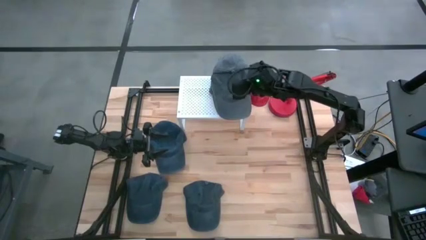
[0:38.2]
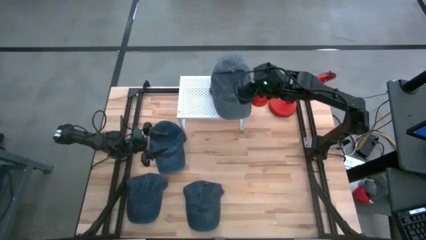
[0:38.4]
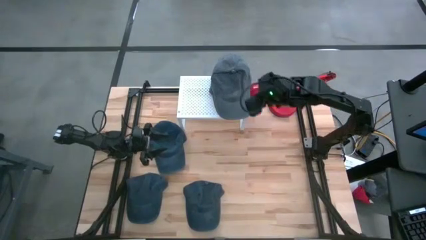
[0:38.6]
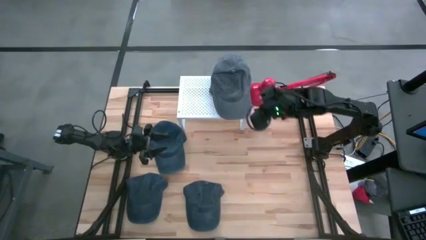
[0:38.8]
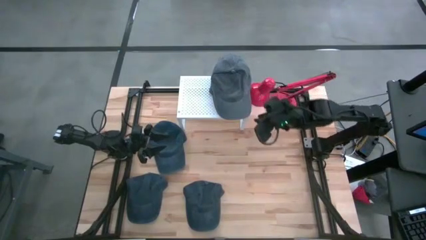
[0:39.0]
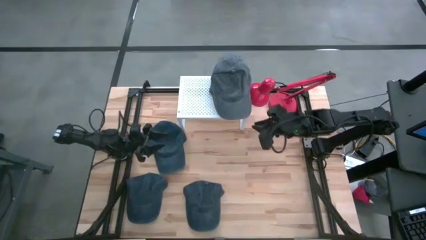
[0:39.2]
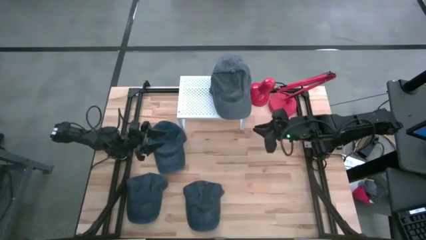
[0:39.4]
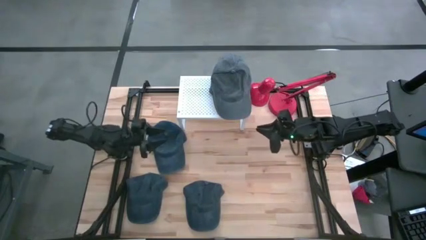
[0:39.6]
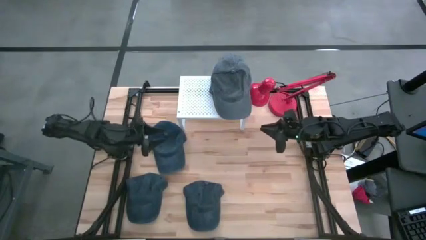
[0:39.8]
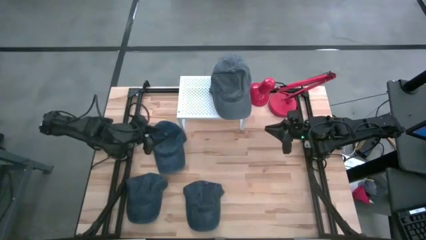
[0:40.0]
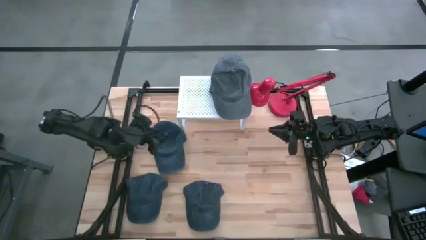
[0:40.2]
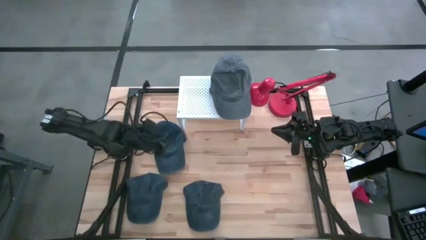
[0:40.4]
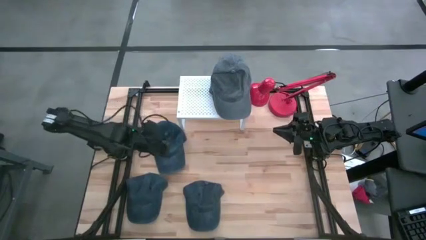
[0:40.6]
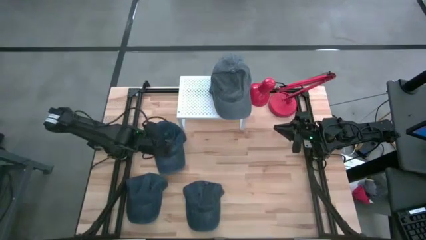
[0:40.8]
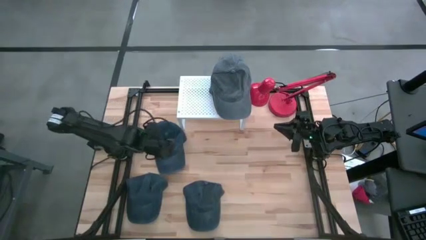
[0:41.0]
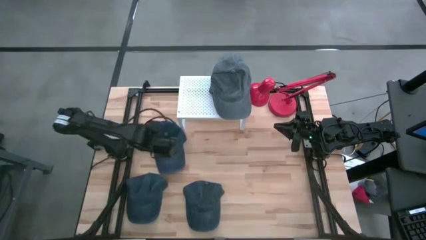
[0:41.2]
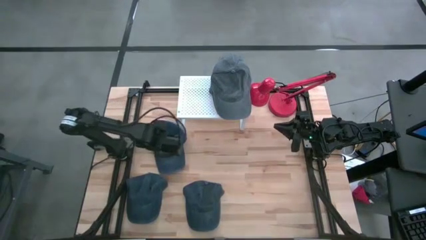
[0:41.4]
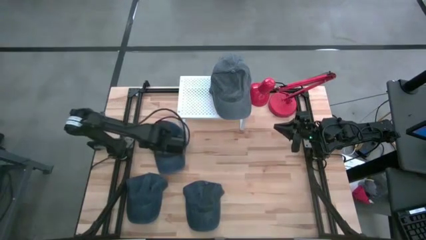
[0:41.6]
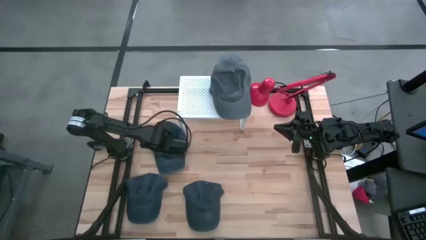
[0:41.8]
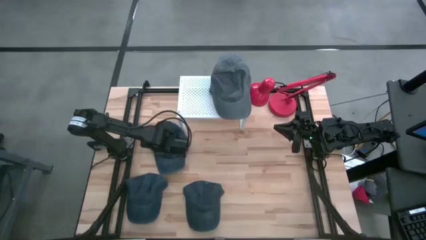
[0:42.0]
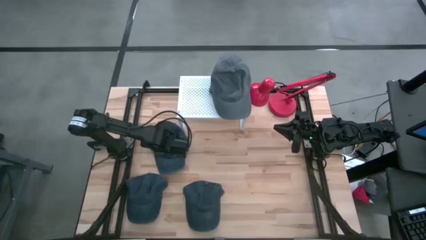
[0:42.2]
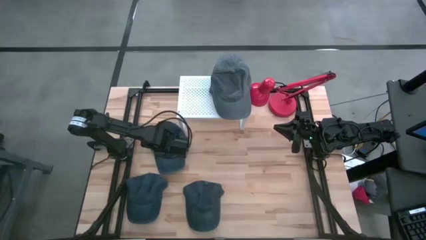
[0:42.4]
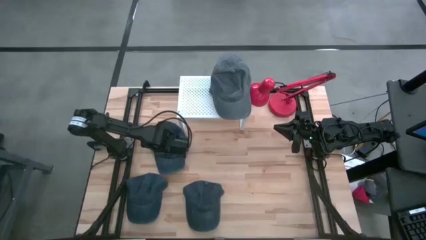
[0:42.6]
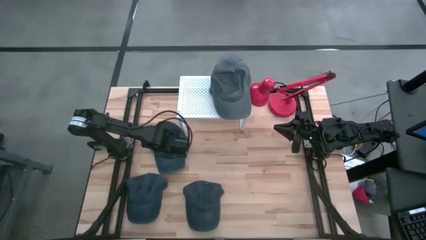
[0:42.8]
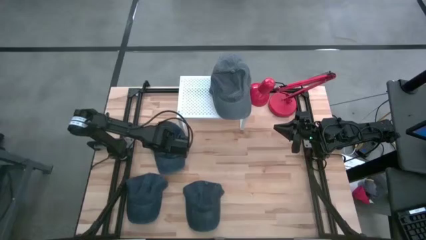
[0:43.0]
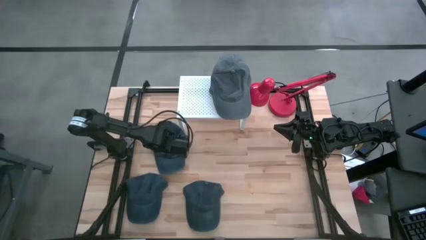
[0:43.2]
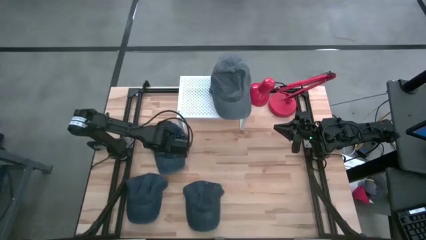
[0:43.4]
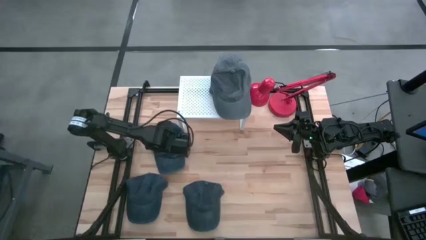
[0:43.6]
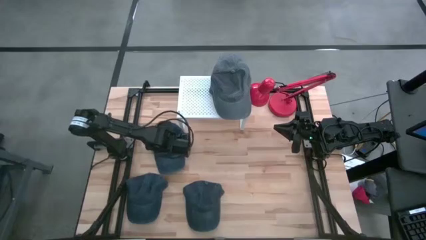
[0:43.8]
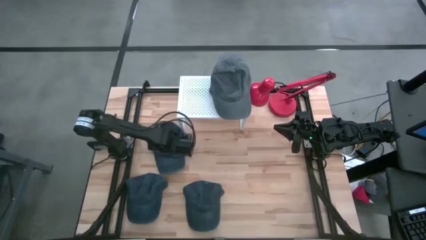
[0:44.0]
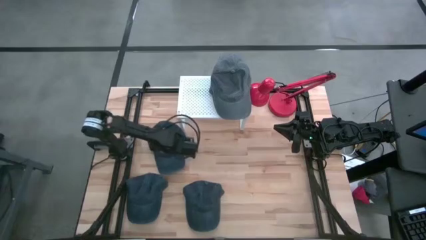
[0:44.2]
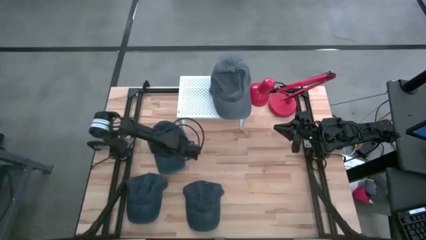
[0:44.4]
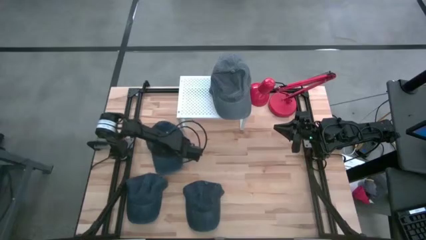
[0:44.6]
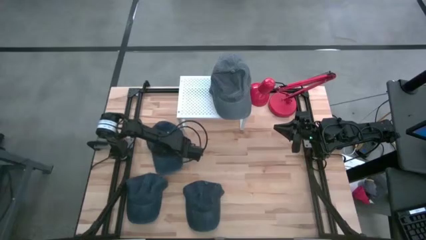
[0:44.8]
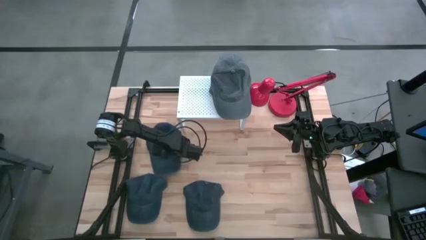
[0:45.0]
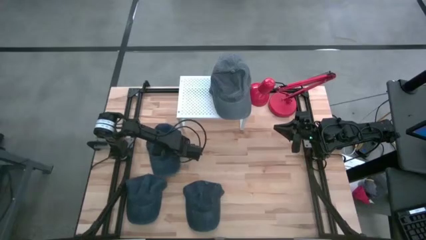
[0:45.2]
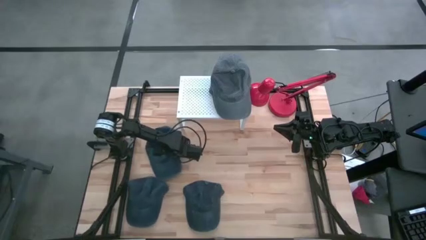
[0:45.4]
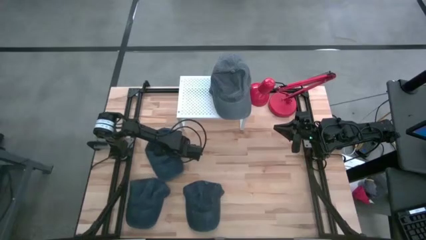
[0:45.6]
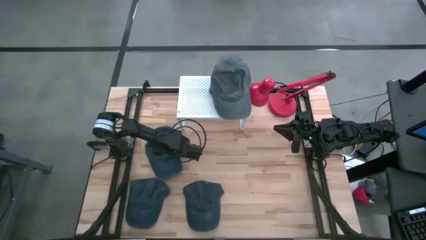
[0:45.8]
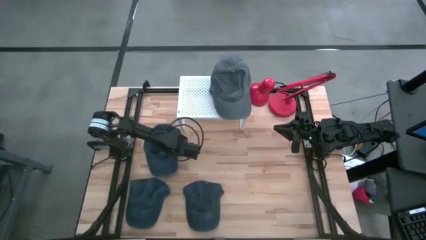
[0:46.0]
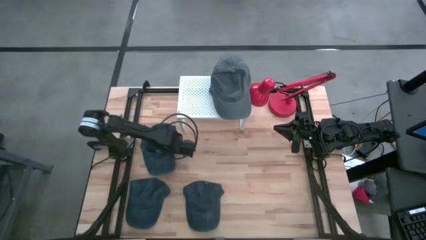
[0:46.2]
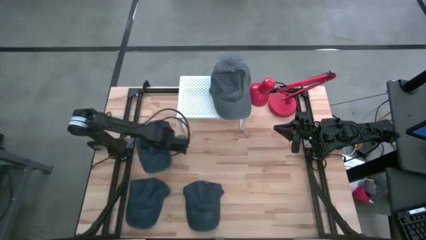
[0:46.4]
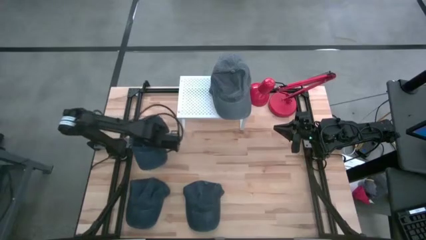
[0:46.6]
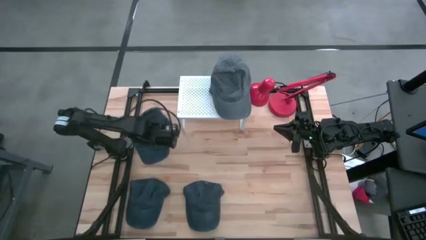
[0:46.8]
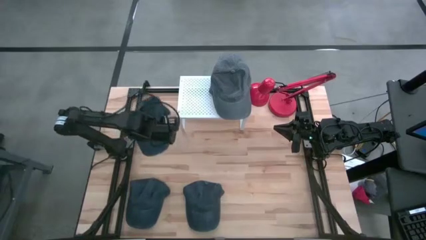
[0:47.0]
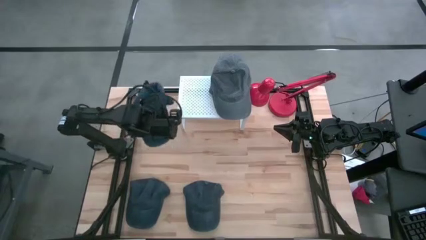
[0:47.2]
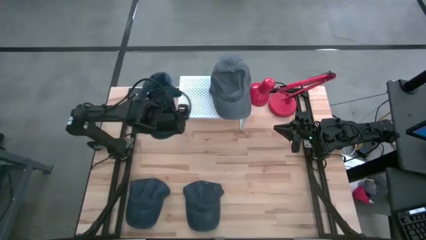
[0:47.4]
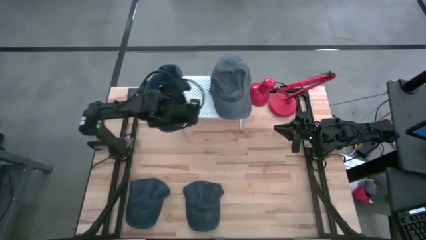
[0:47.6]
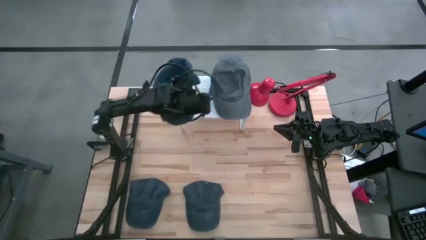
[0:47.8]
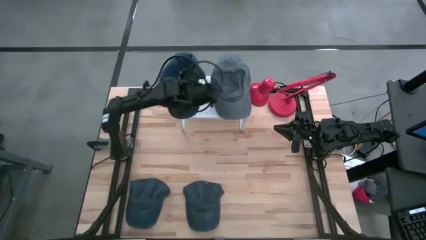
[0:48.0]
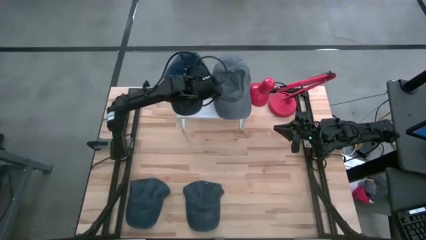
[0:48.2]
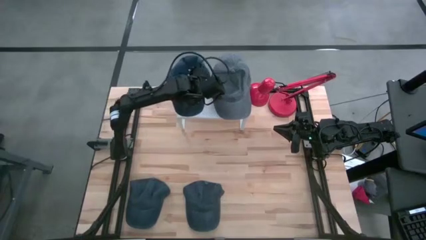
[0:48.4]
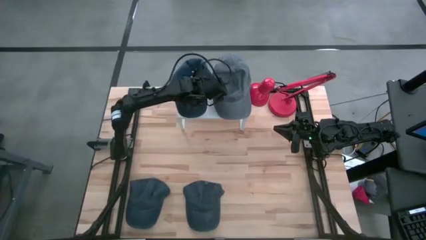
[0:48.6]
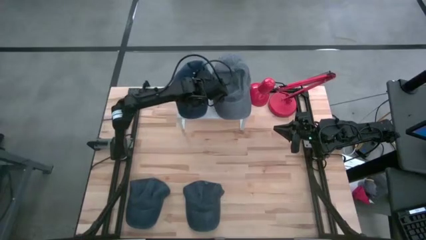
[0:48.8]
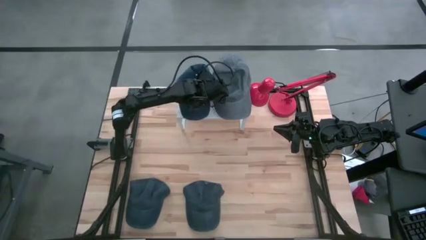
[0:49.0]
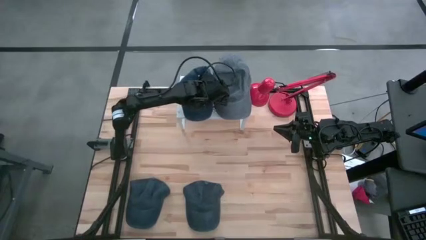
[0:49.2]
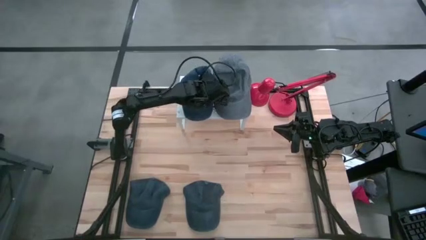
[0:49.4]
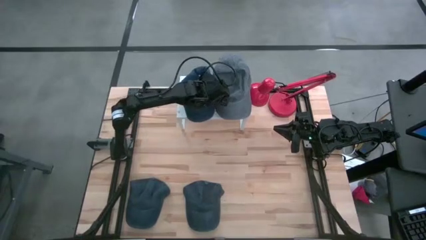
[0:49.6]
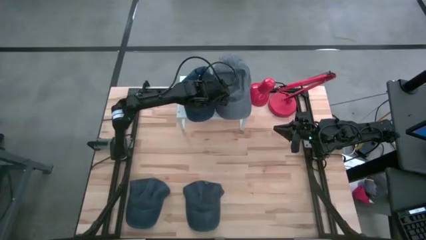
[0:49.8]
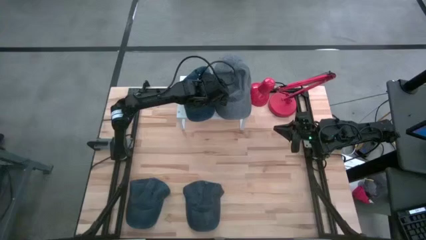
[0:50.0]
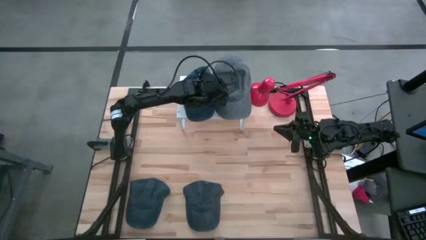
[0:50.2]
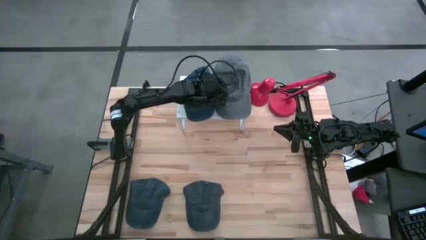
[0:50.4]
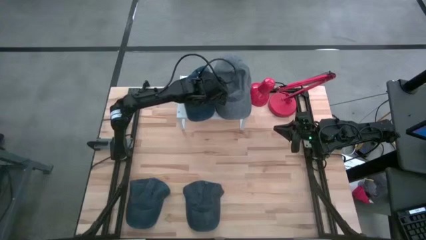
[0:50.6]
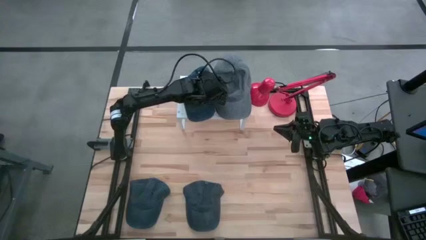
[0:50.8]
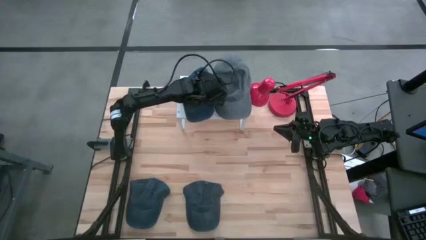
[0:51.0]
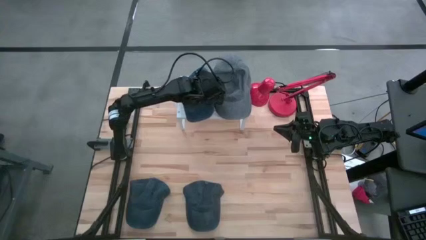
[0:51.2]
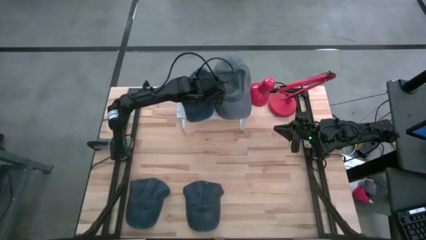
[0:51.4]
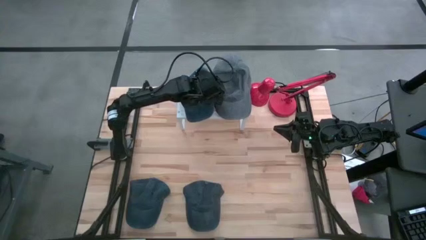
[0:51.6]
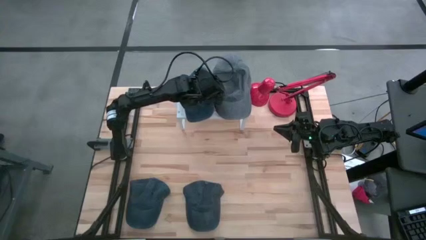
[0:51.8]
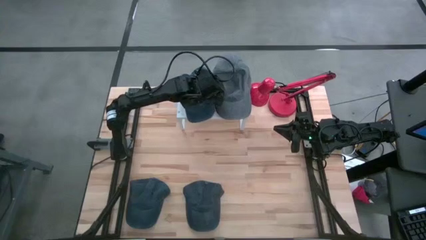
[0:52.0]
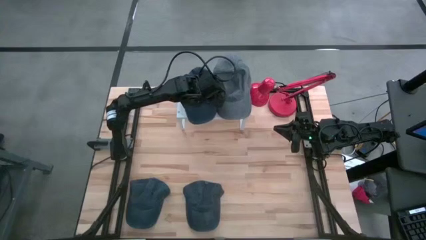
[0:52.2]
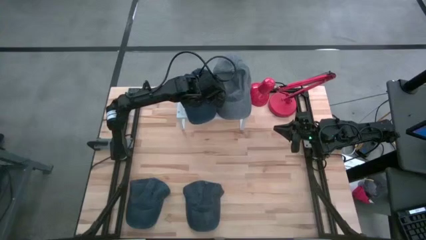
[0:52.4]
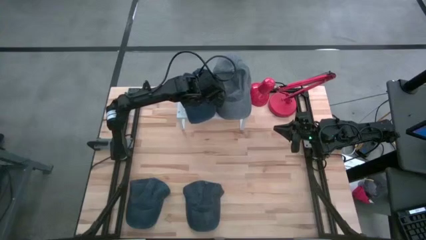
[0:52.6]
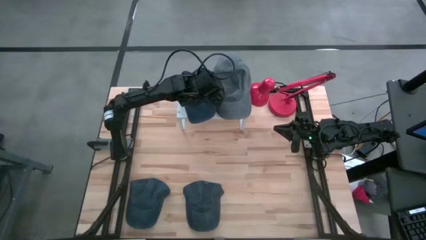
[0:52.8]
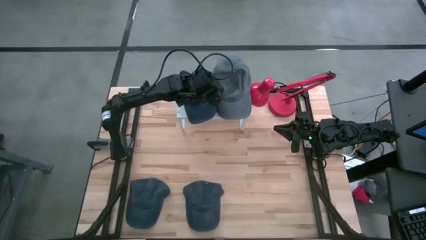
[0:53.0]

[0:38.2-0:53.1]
Task: Pick & Place hat
Put the top blue cap on the shelf
